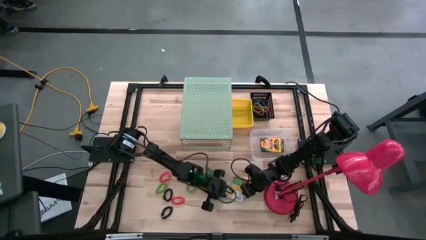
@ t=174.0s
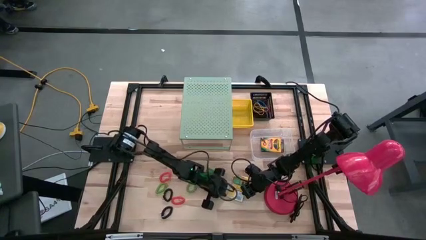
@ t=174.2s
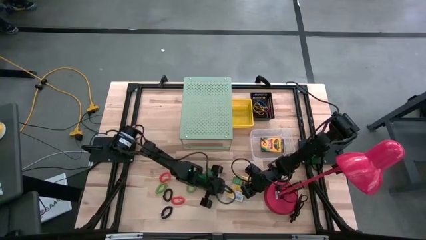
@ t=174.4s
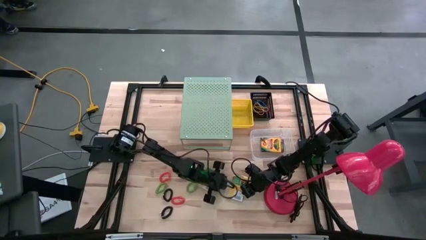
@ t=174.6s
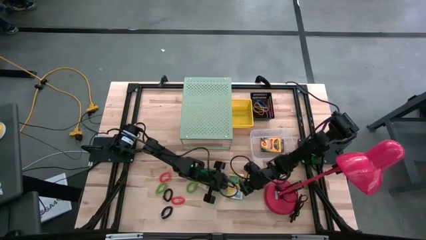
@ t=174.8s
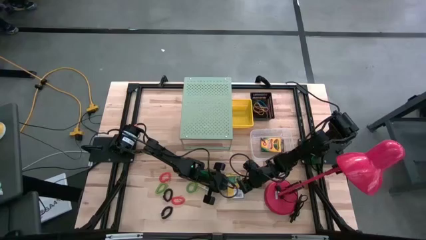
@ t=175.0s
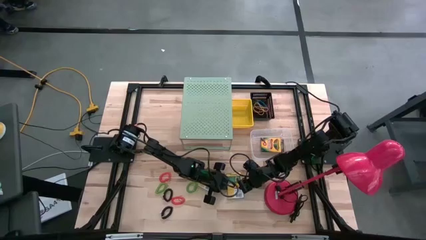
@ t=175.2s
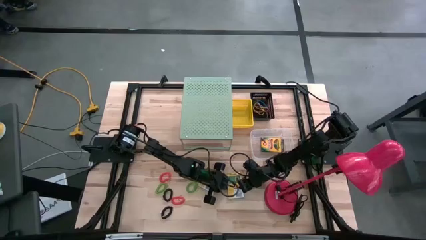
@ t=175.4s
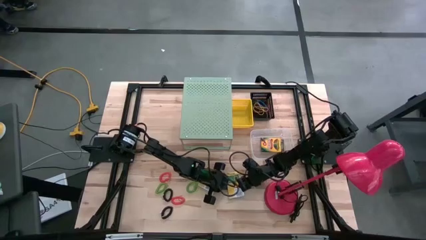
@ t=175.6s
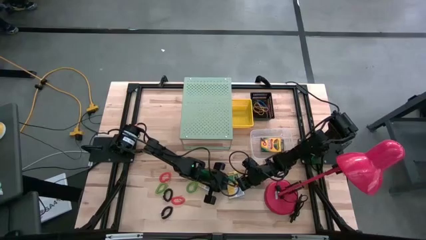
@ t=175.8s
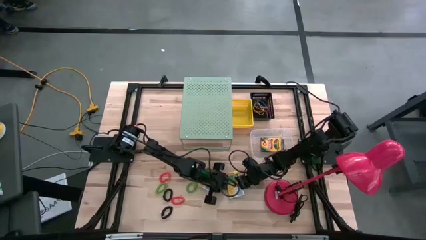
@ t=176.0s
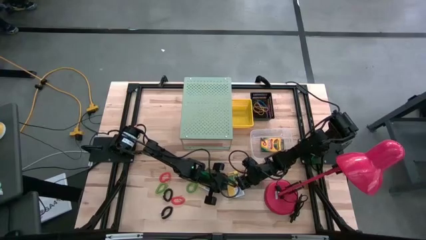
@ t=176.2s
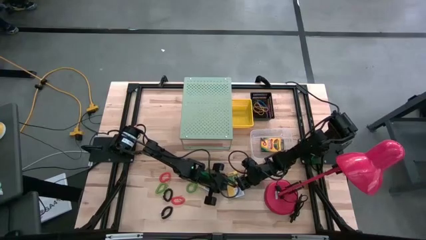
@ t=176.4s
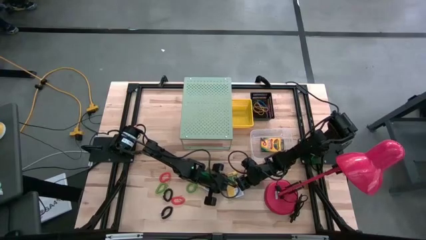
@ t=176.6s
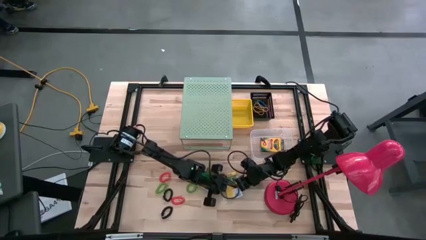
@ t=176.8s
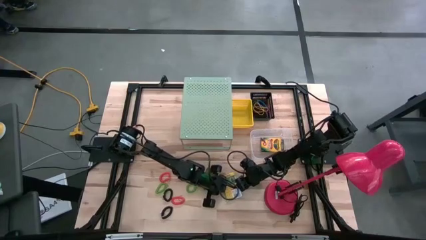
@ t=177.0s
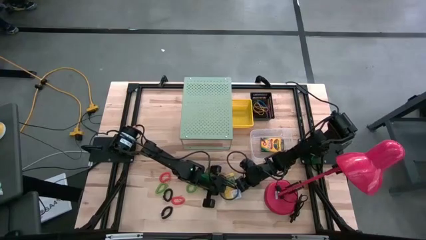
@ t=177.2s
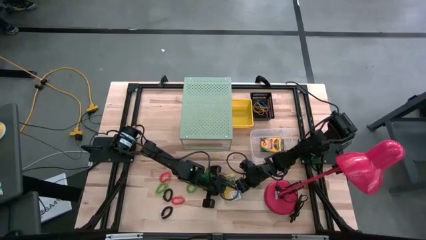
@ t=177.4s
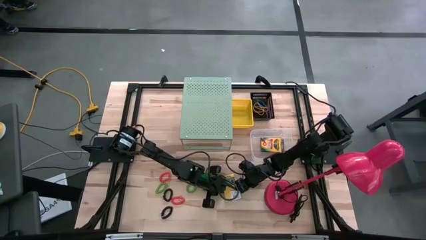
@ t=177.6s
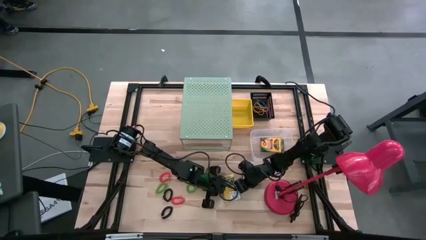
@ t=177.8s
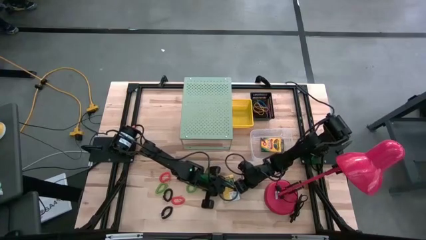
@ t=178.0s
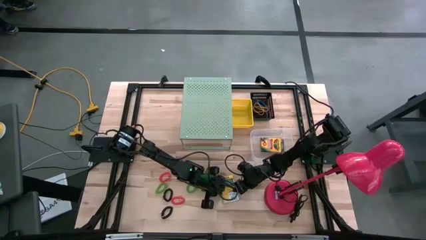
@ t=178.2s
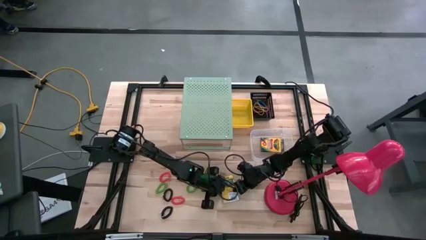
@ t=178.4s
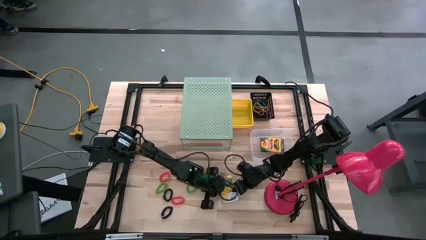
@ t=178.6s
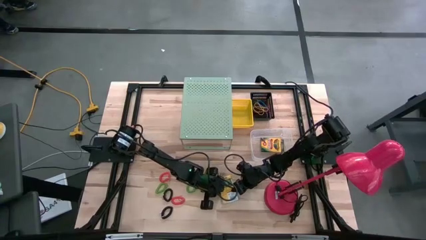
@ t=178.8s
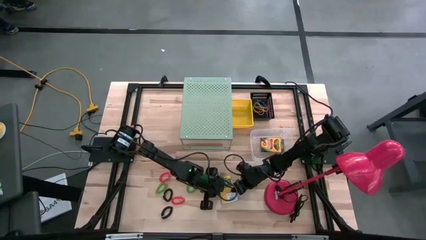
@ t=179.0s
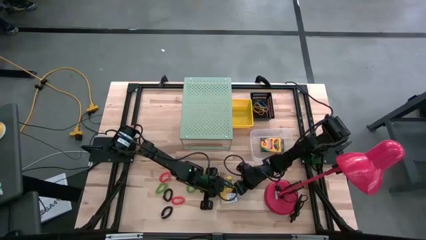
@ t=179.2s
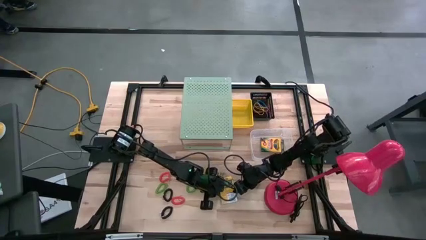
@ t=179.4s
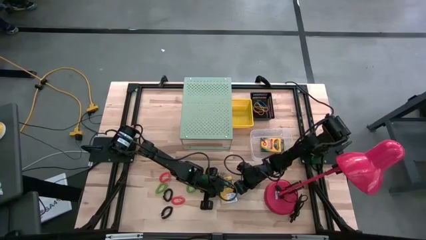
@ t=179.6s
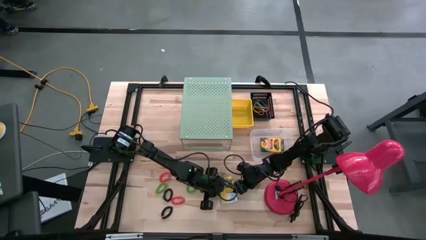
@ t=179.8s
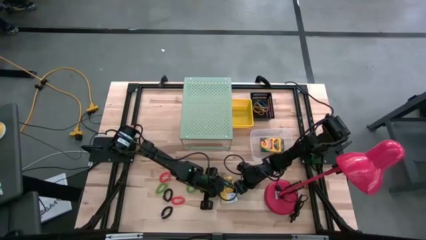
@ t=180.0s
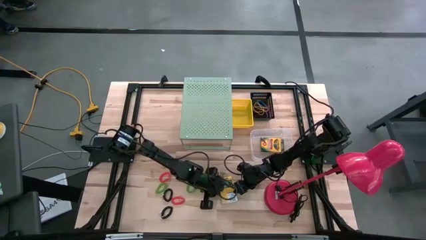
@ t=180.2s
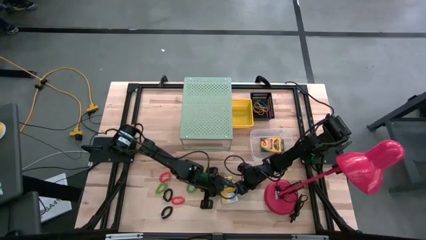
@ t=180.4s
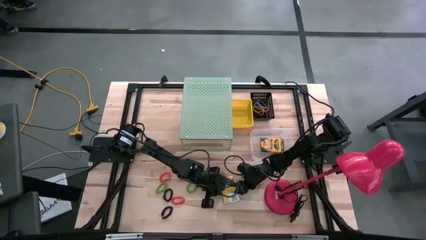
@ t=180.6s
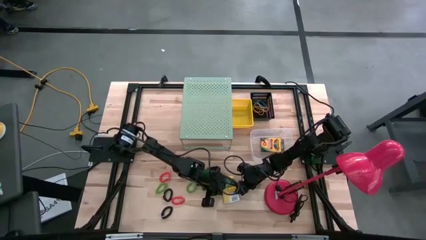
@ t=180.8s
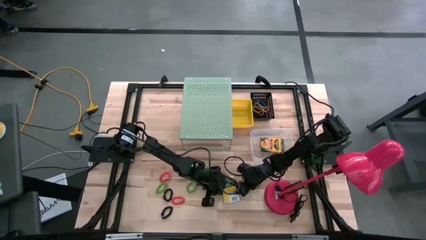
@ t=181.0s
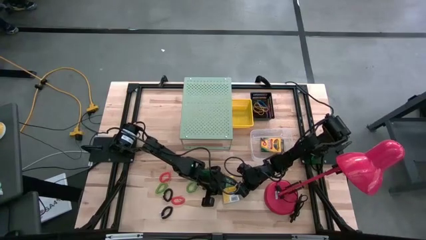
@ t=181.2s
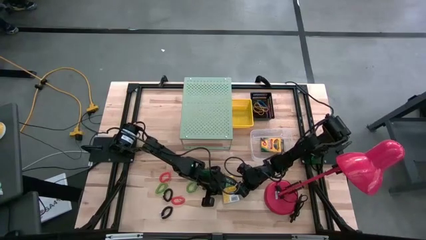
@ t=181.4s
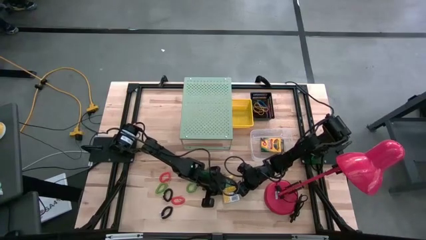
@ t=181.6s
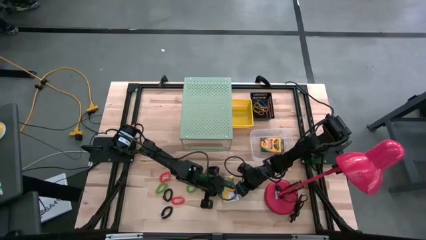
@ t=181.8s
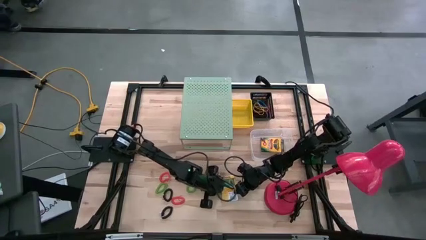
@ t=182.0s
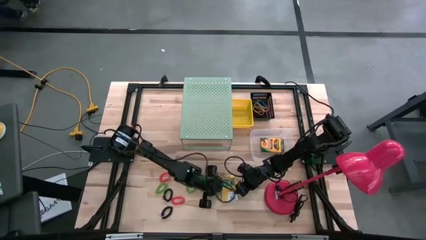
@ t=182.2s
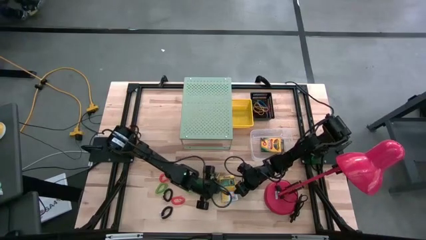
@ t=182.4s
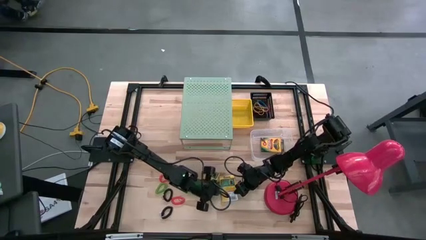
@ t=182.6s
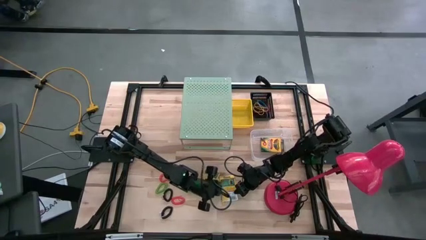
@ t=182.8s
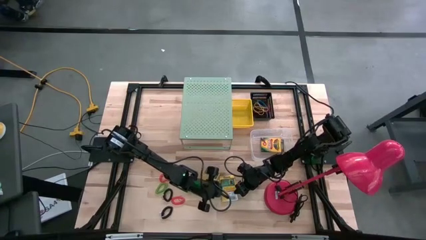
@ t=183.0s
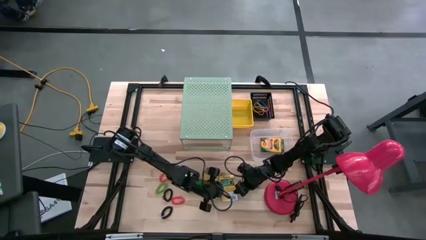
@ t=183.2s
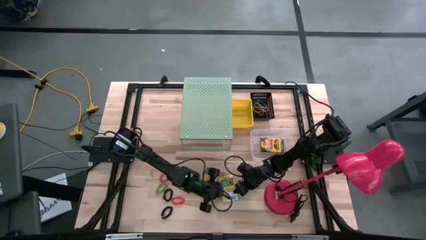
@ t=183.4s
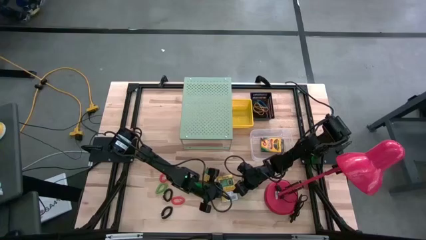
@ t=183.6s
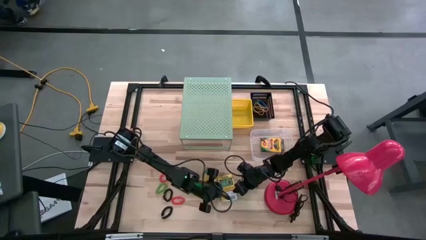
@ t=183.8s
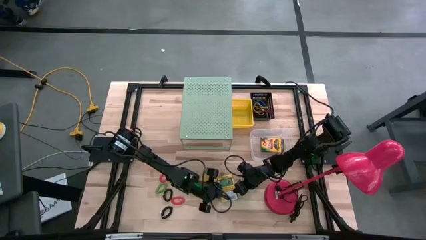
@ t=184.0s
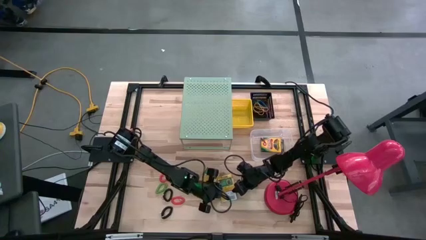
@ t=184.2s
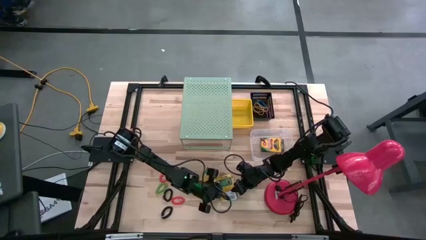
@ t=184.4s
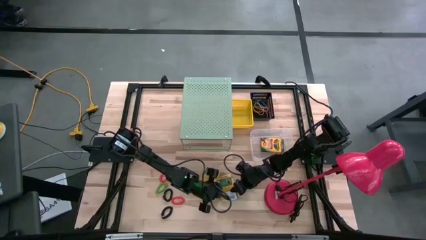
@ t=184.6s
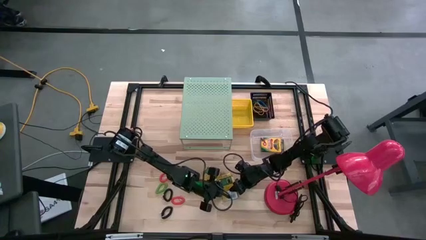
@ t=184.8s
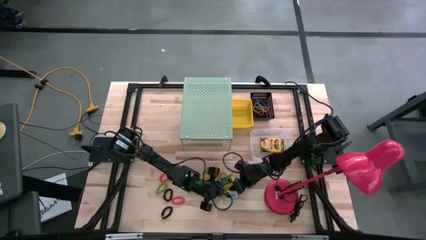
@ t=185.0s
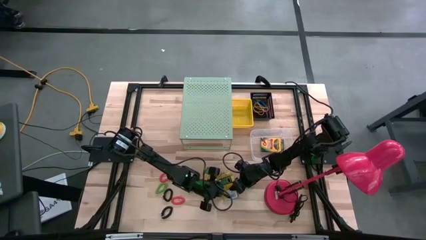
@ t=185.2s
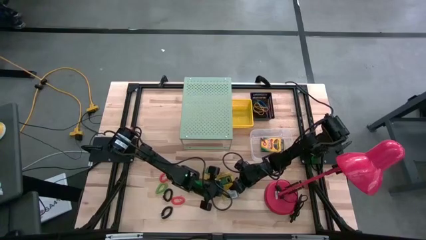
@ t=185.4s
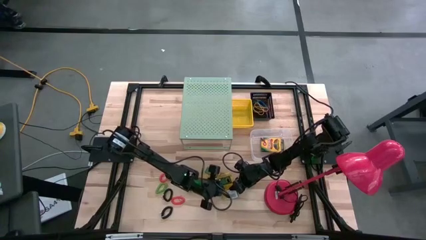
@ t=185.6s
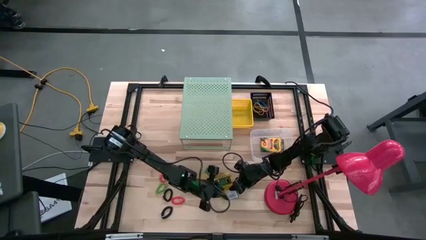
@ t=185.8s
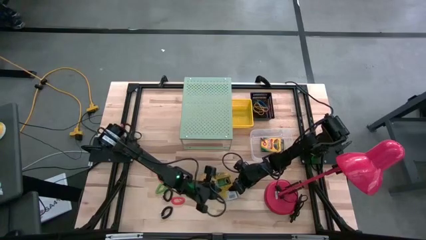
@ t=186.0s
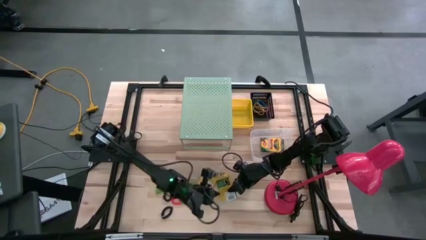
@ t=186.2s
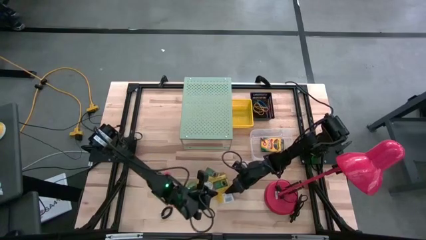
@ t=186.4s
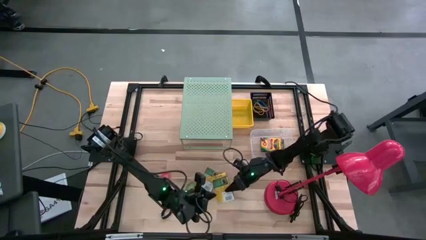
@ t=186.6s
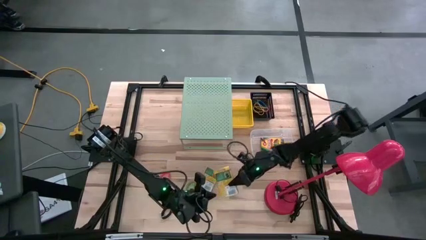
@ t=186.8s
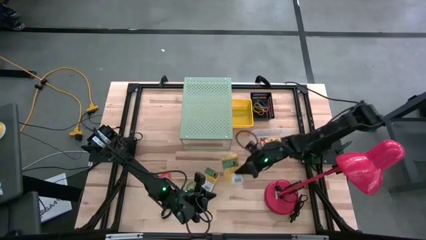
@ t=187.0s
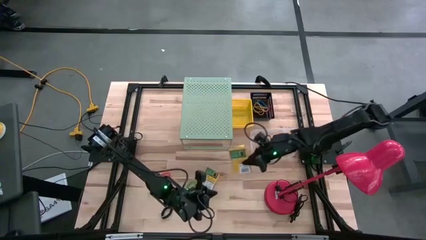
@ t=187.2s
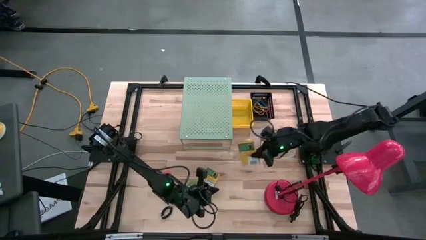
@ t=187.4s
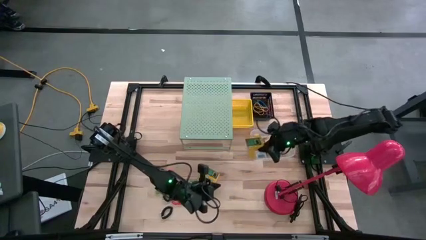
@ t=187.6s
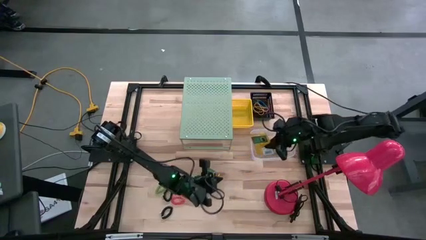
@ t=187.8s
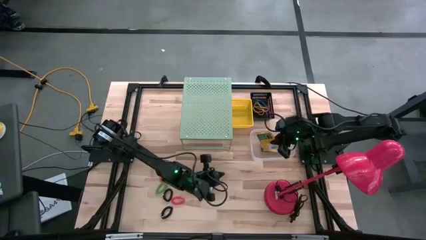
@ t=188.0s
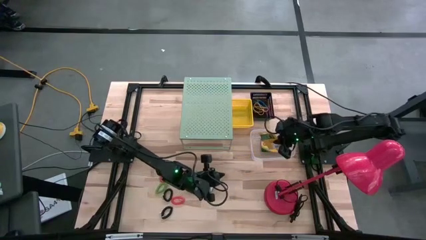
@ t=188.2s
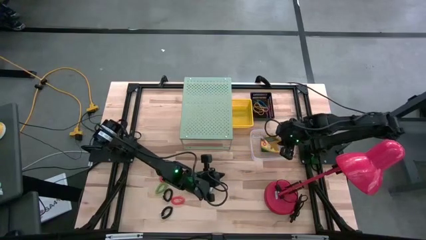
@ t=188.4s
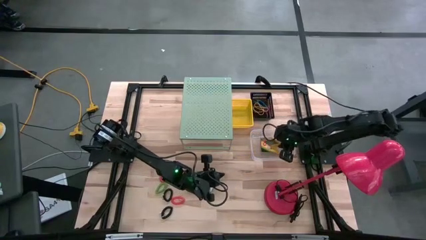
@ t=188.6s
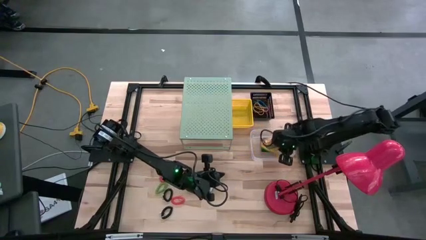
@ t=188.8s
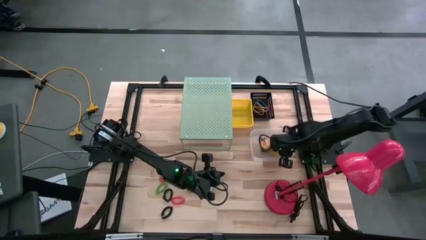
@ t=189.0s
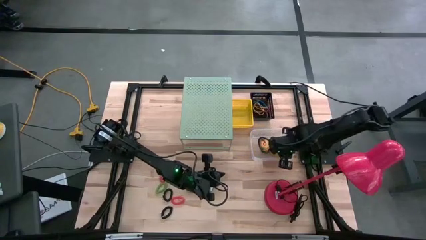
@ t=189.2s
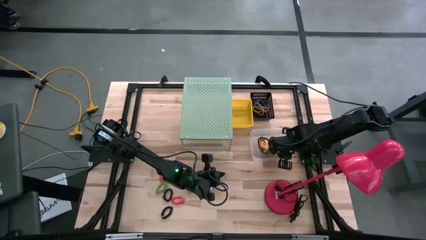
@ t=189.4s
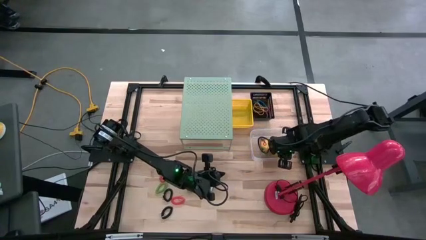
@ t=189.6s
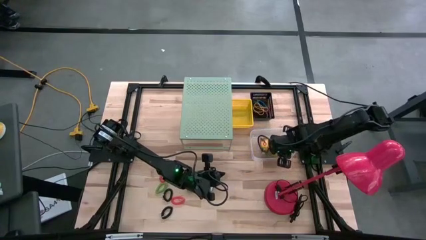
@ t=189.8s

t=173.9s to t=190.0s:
Task: Pick & Place Office Desk Supplies
Put the crayon box into the transparent bin
